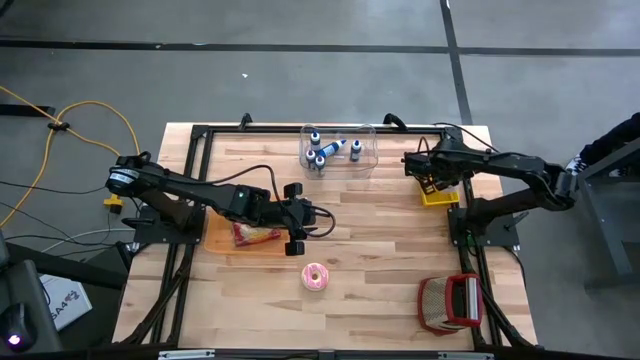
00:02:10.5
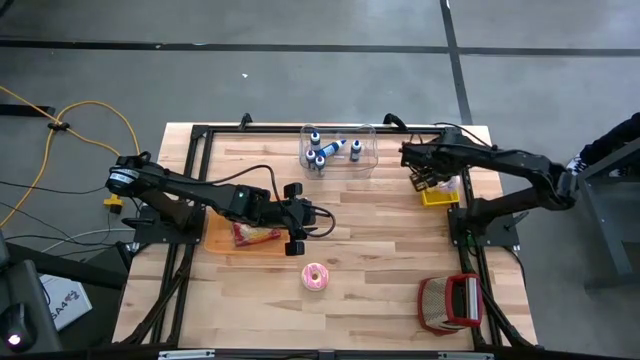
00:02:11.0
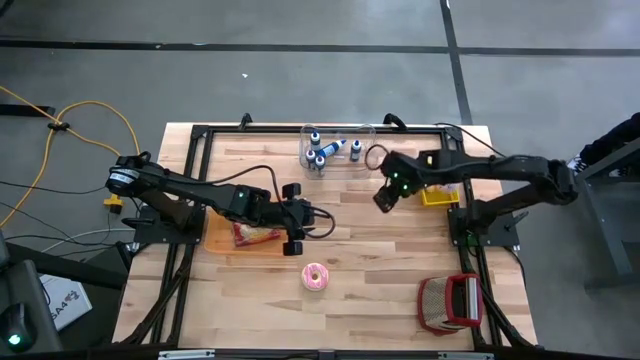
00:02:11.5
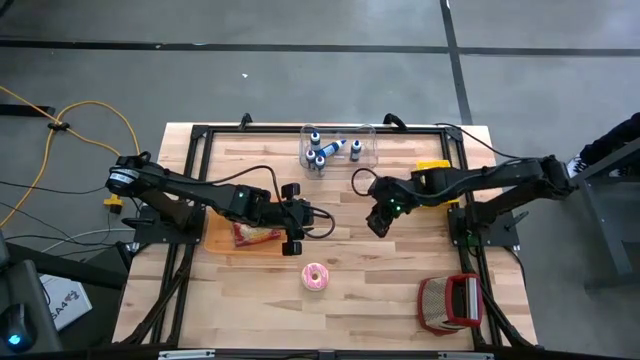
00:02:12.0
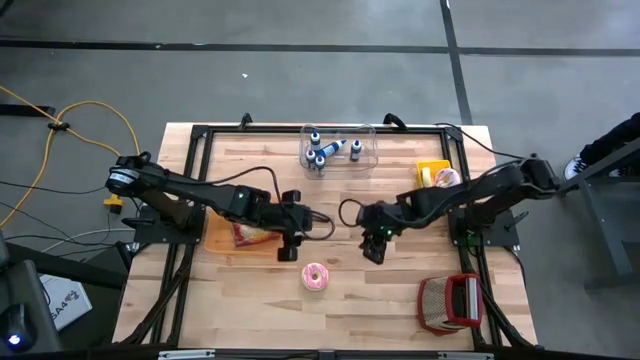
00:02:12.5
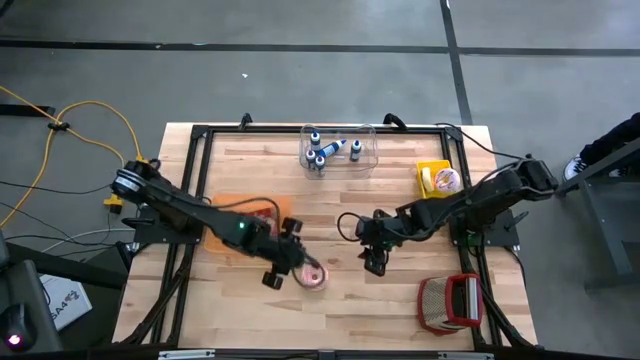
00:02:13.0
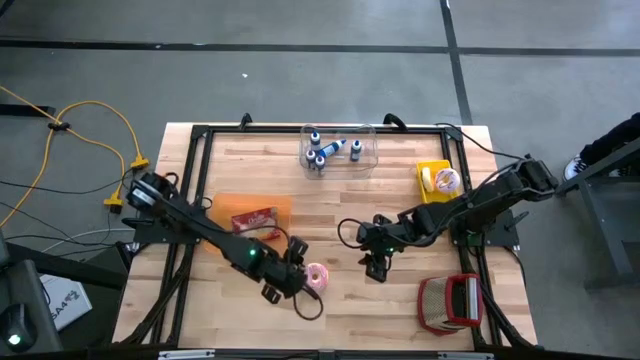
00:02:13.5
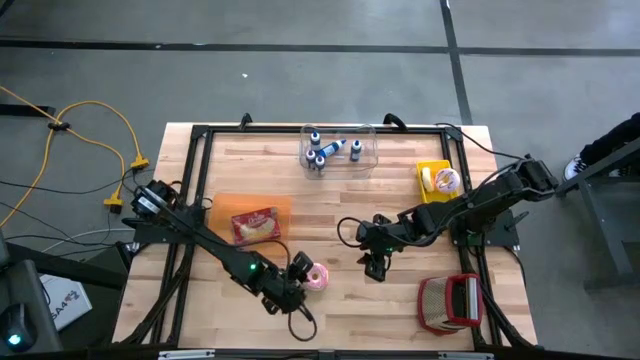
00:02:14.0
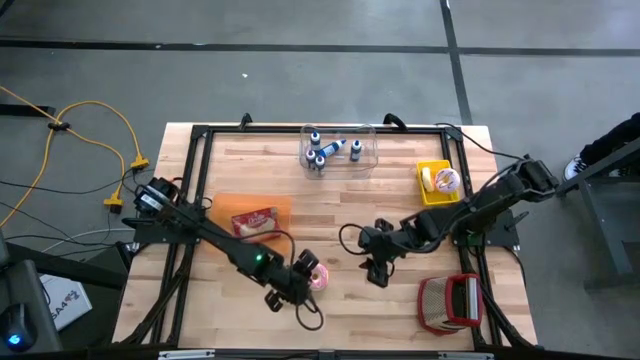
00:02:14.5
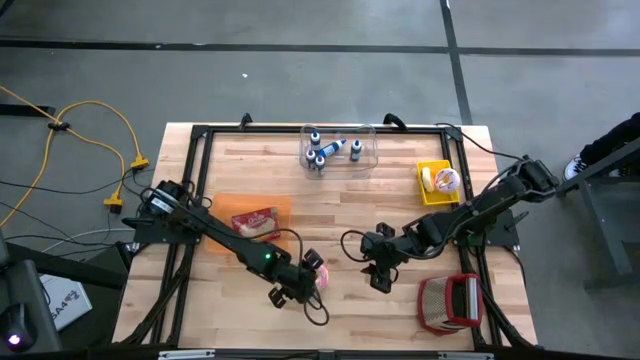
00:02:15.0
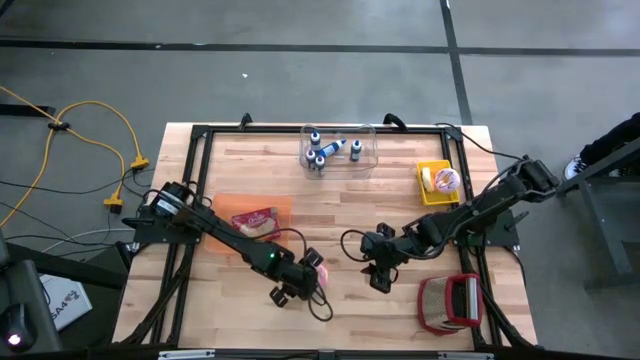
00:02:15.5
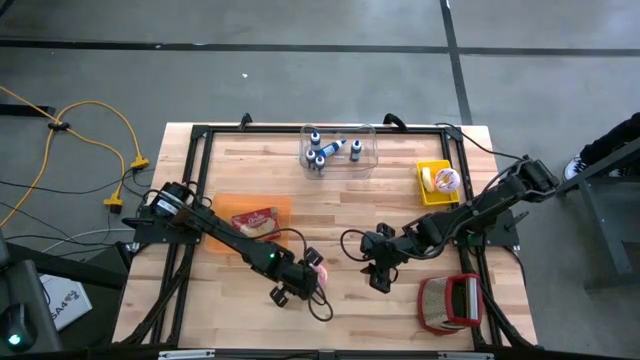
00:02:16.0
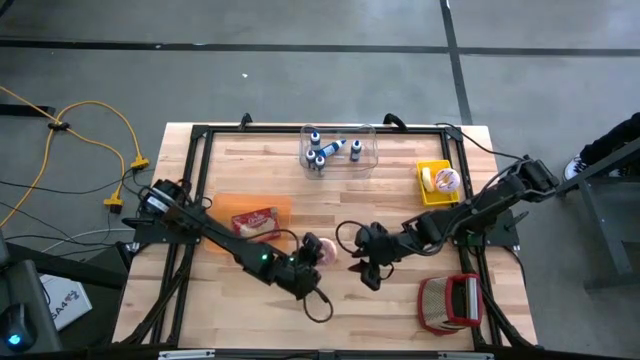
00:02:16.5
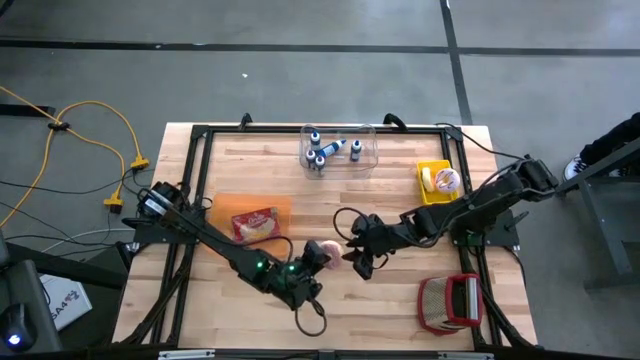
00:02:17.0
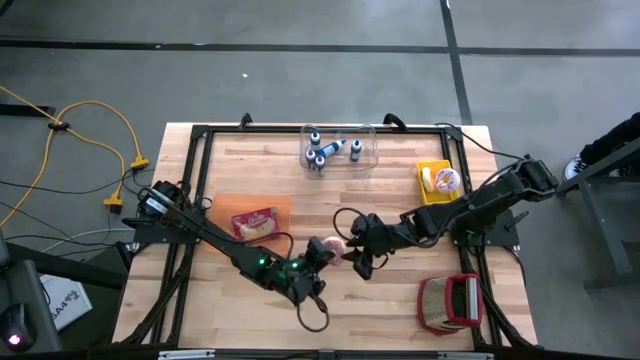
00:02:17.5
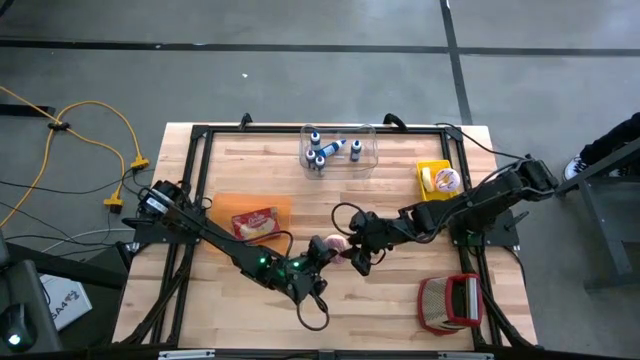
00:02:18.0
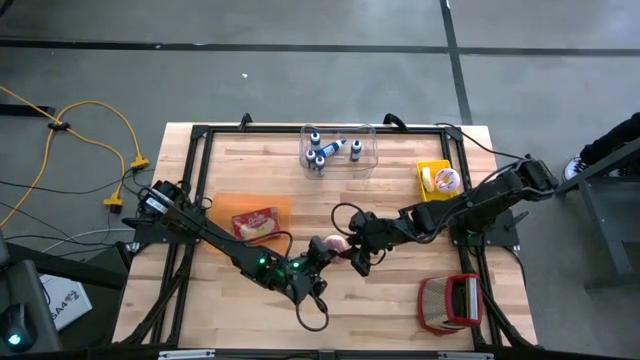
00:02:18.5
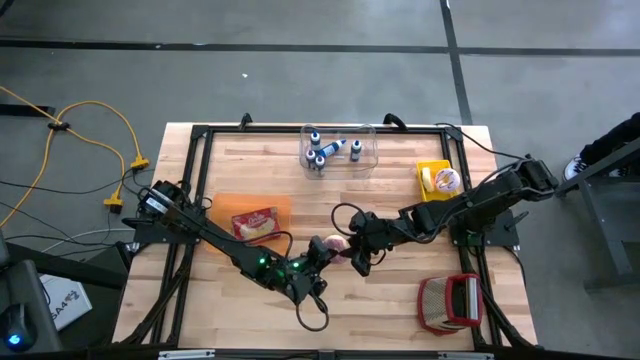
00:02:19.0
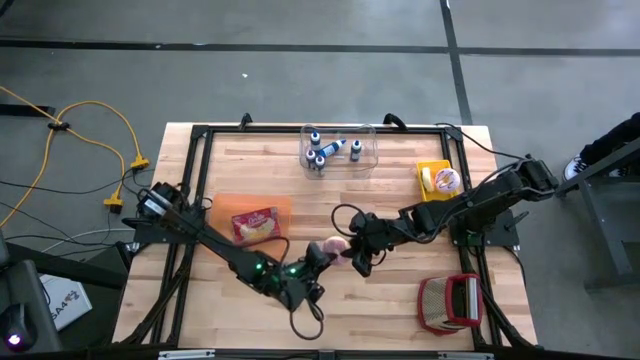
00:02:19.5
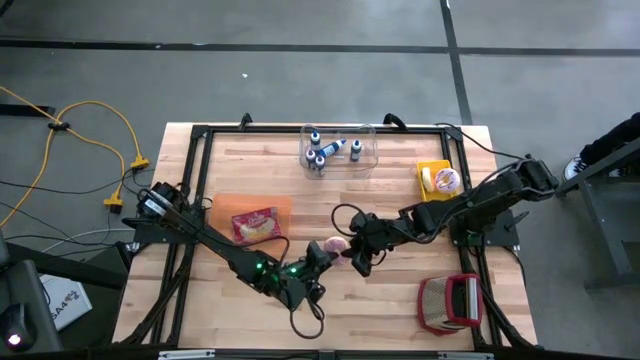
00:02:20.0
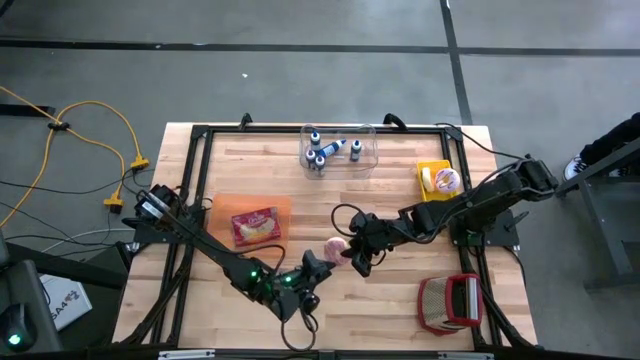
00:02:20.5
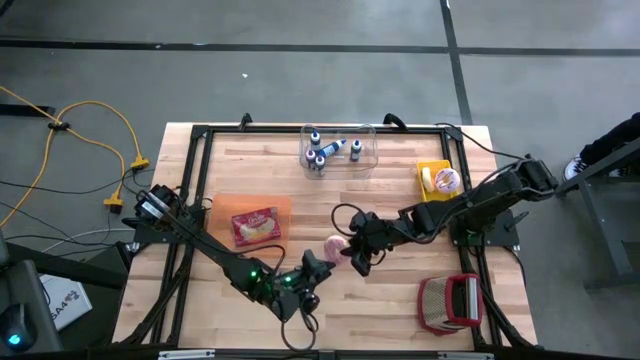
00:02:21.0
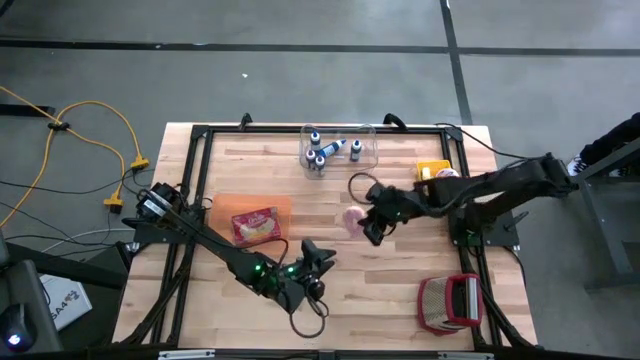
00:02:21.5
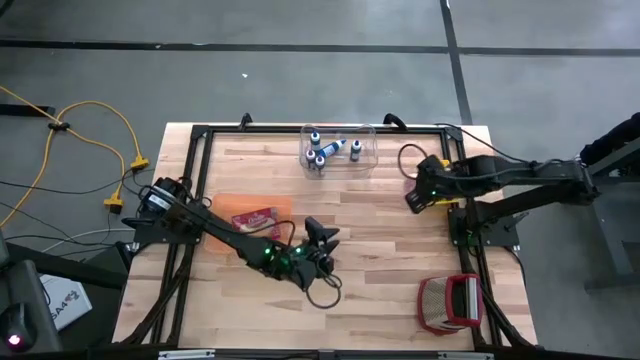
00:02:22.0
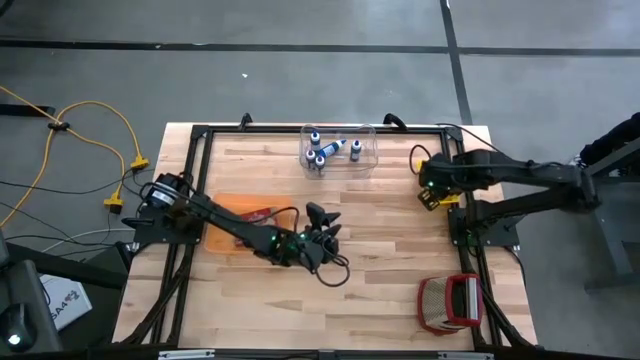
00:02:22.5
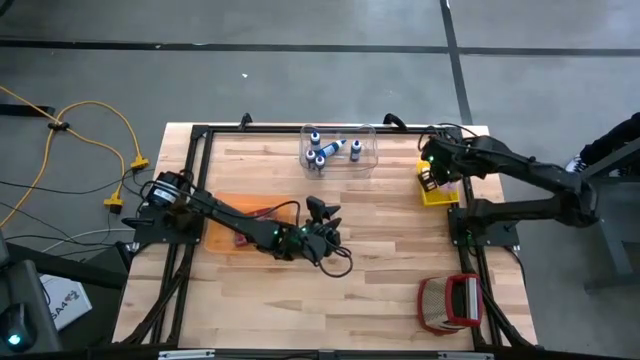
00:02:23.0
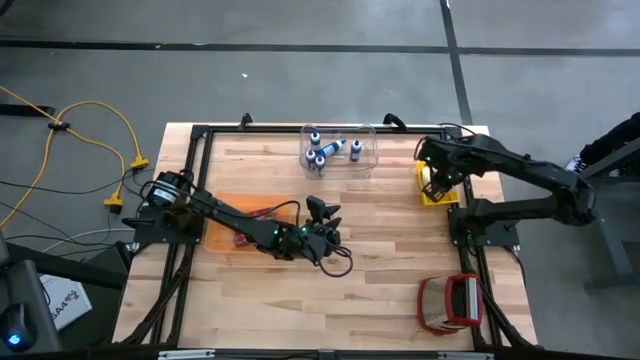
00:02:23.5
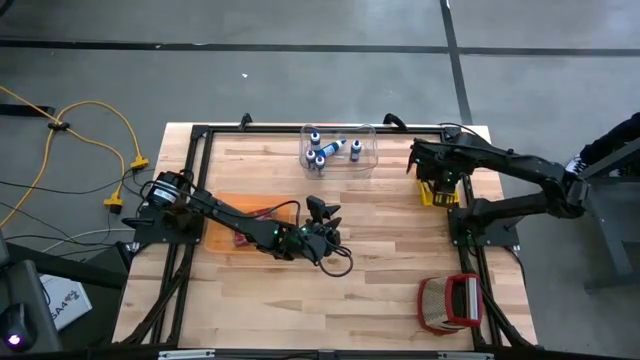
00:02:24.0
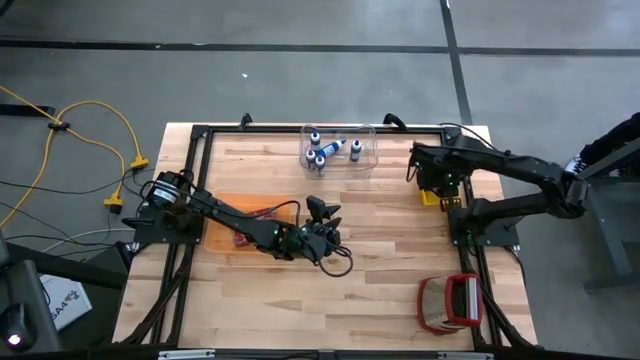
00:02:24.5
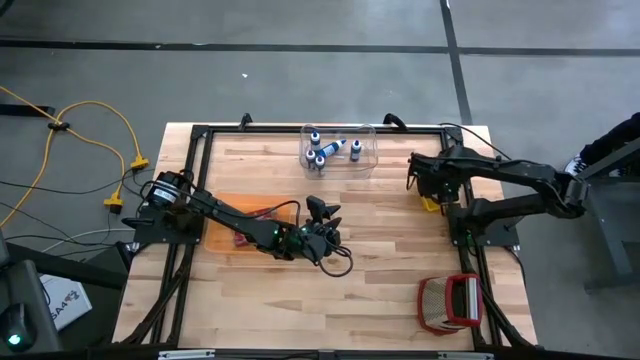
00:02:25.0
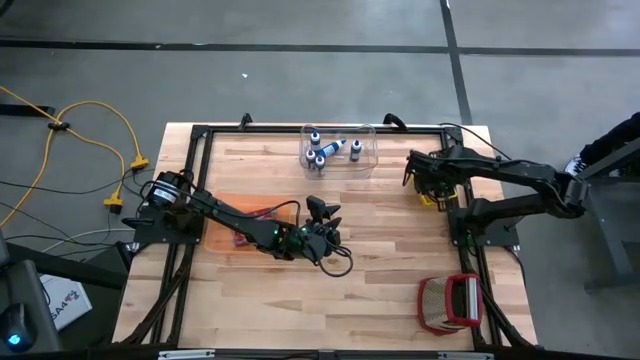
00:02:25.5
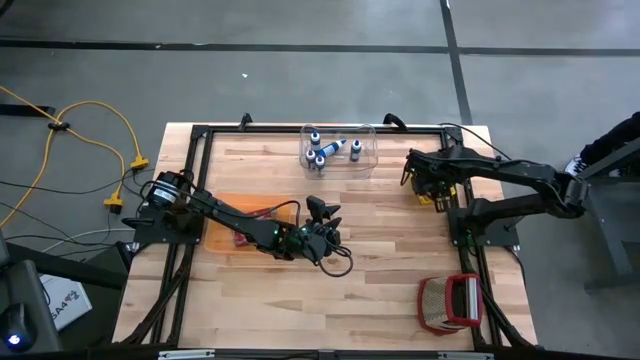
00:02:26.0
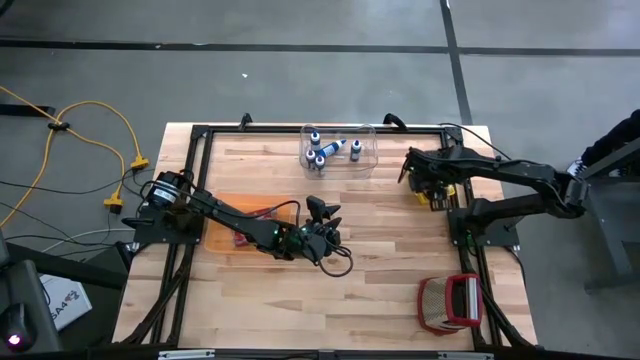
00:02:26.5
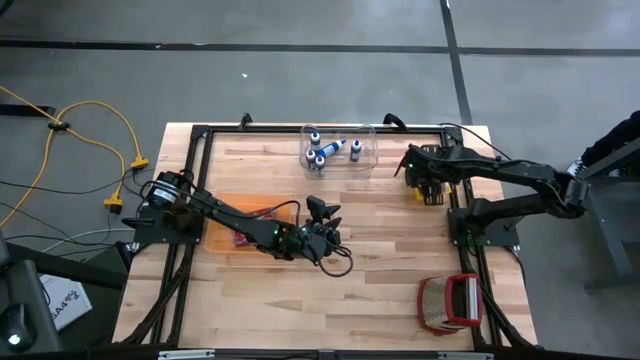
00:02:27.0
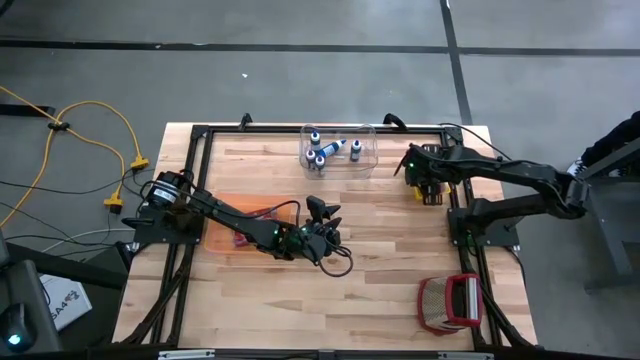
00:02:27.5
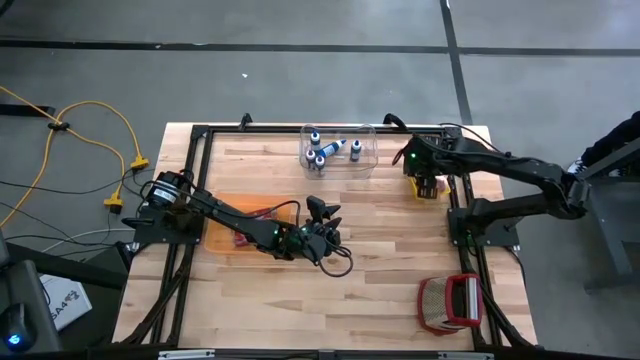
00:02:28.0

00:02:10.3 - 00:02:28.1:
Put the pink donut into the yellow bin

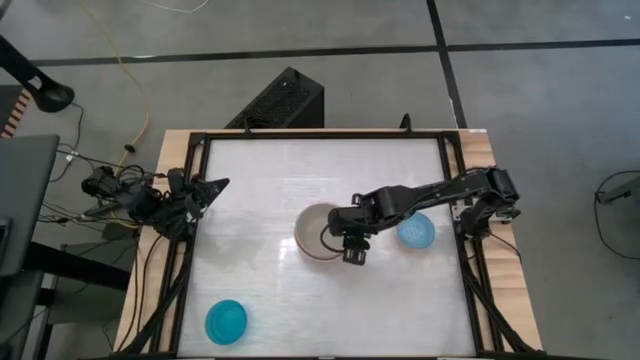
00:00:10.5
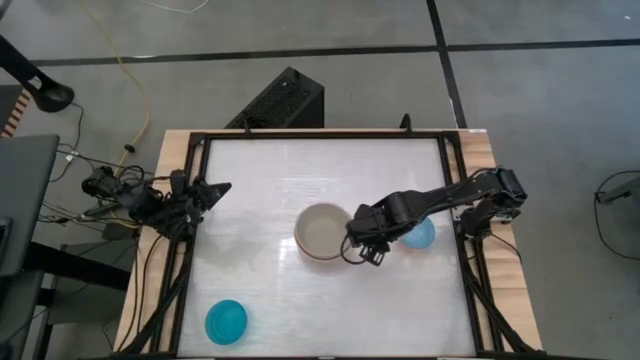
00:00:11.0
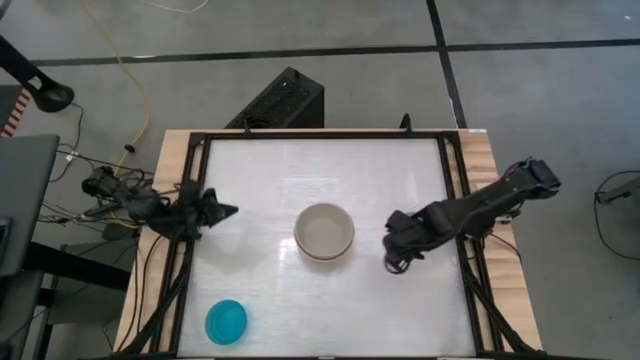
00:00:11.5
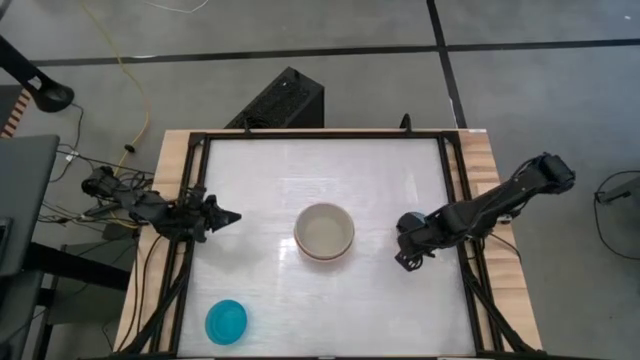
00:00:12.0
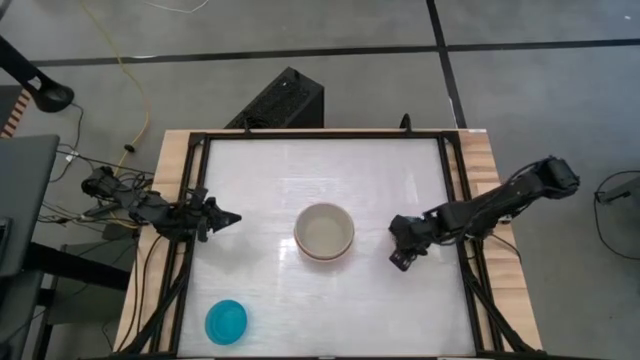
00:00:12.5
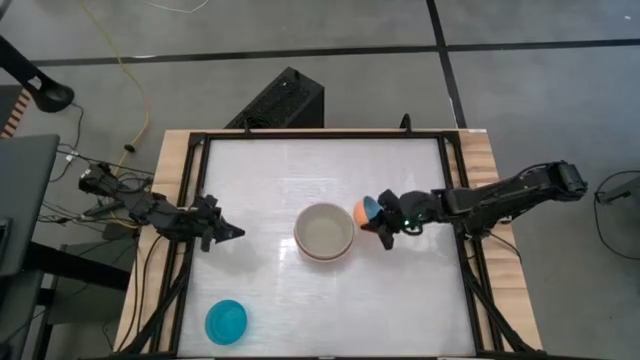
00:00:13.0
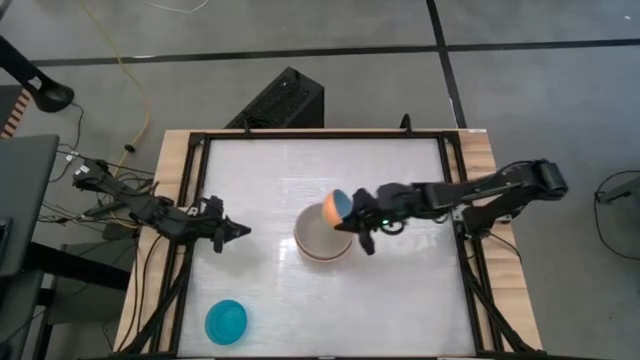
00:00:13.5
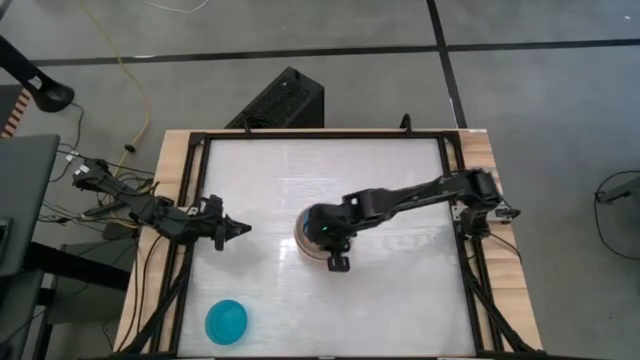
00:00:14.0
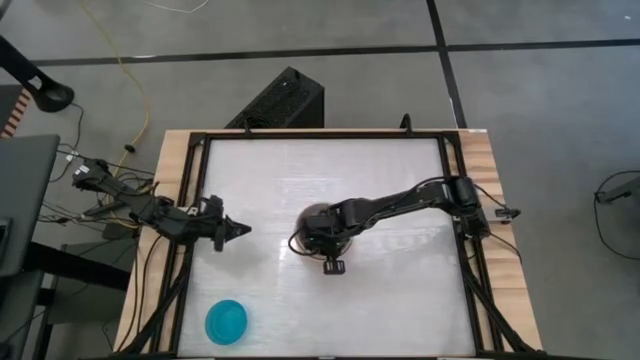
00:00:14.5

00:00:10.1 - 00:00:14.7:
Stack the orange bowl on top of the gray bowl
